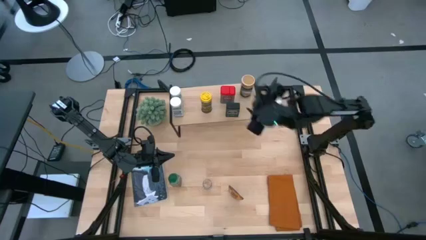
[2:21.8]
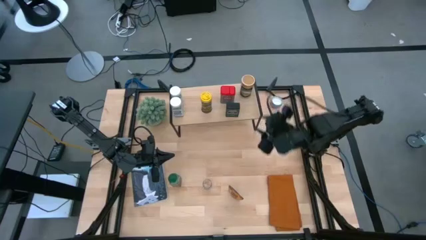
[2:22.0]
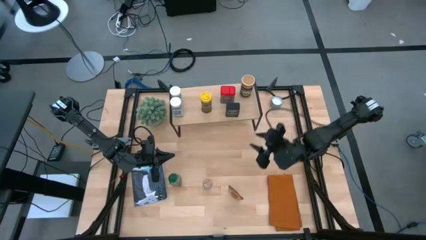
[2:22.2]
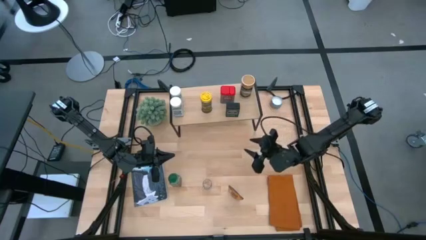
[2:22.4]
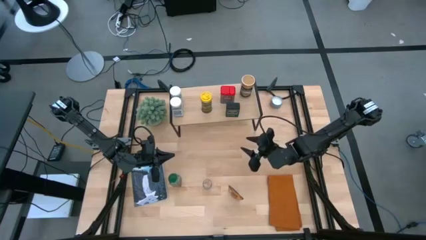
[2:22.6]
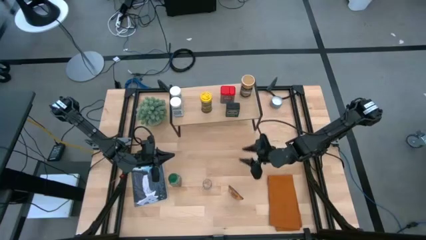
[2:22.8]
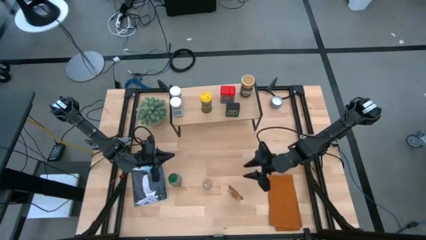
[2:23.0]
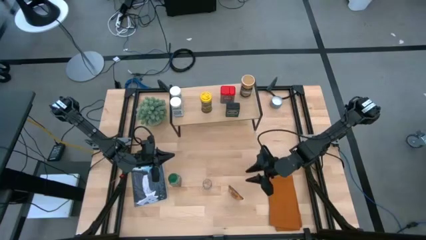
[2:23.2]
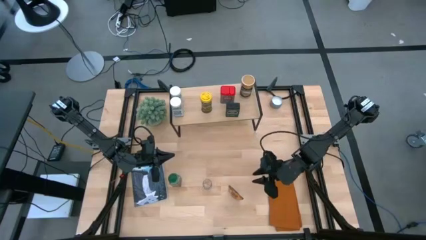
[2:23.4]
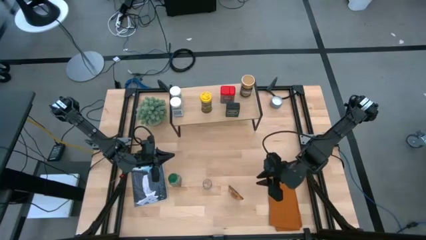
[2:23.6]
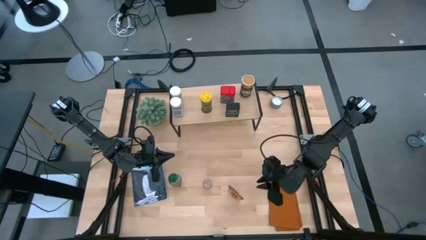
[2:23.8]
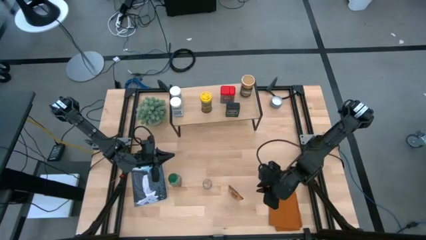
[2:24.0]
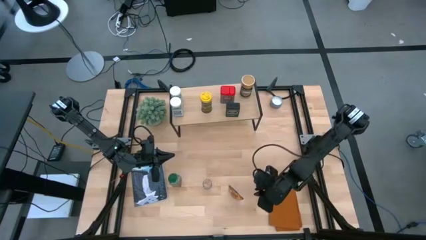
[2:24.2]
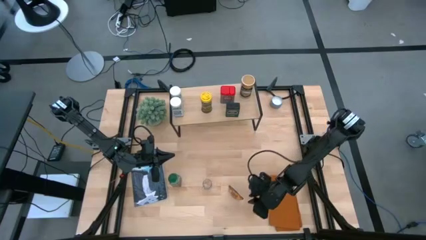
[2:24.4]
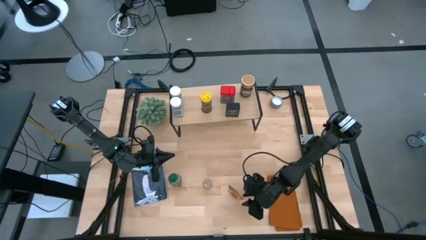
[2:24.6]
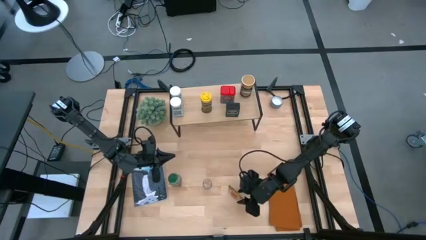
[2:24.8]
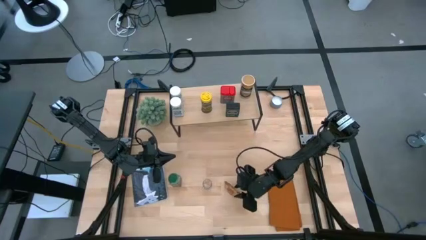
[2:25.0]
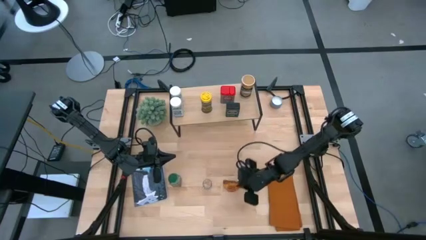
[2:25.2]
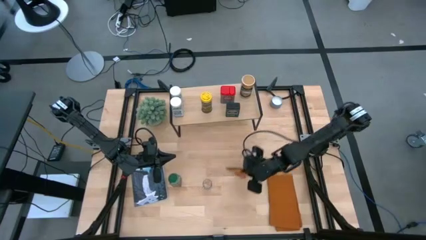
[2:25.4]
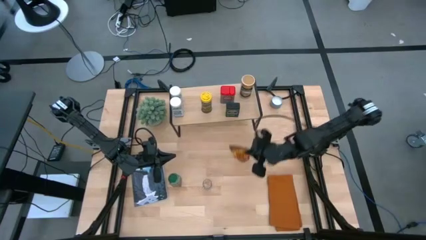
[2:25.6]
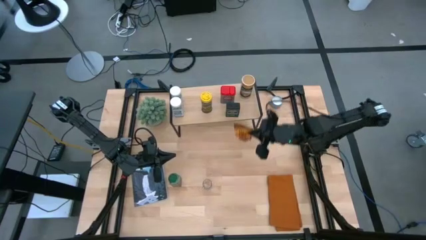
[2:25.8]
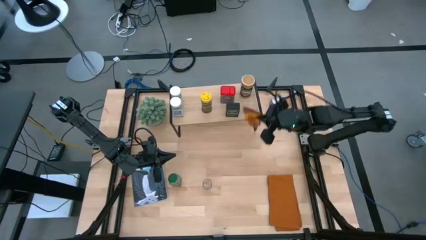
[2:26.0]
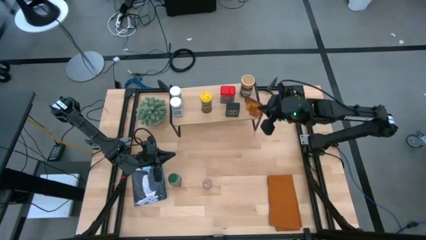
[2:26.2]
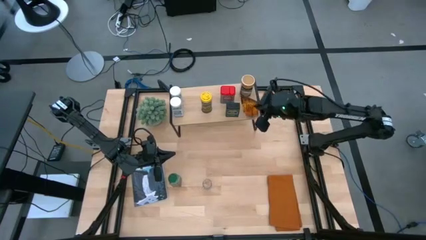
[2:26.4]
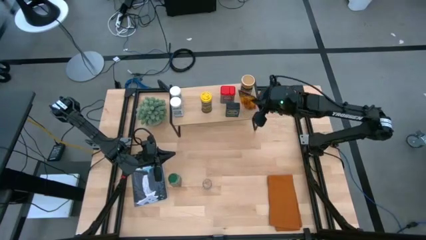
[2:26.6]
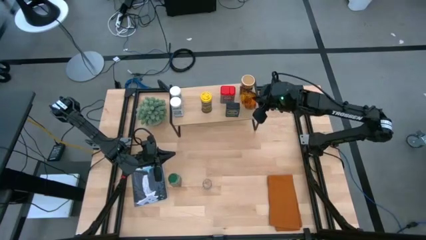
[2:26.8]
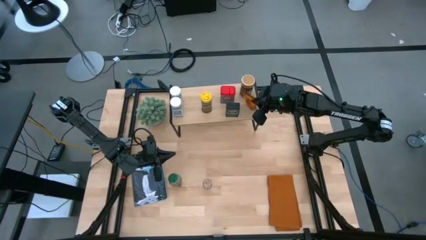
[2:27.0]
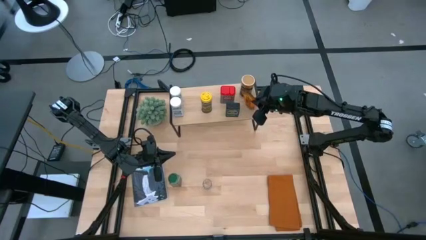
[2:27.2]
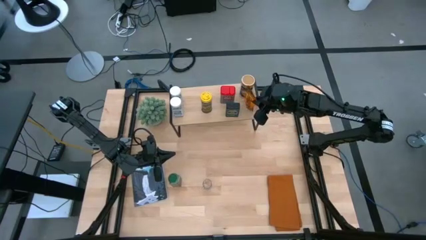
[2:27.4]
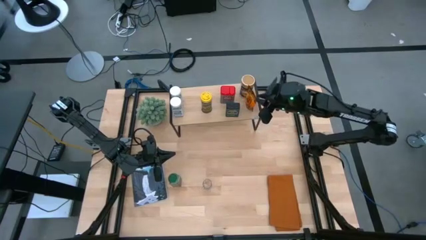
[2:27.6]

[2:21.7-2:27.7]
Task: Shelf spices
Put the orange seasoning bag on the shelf

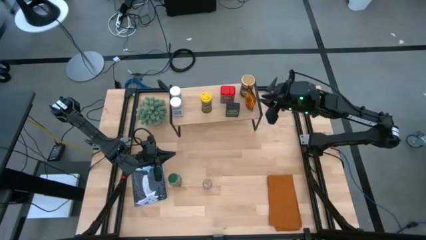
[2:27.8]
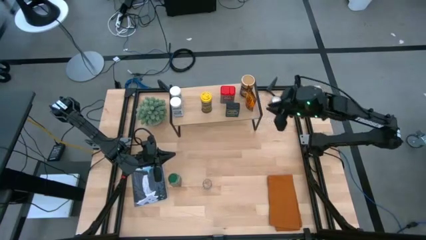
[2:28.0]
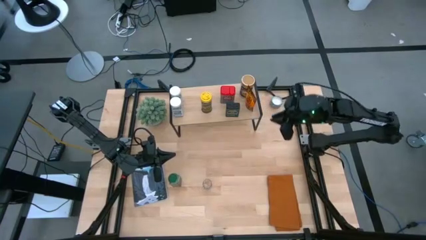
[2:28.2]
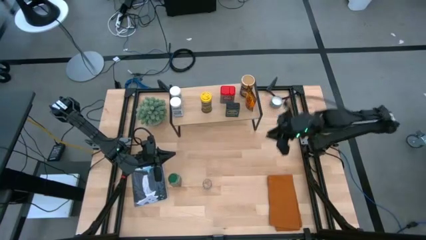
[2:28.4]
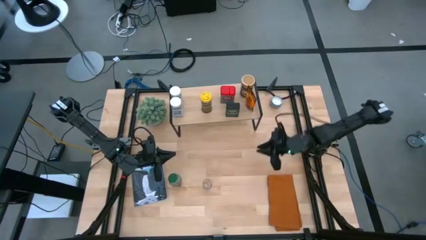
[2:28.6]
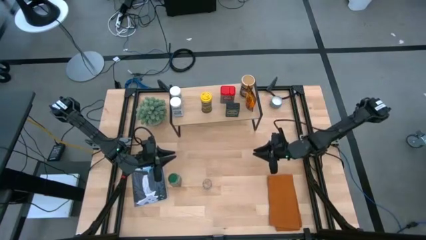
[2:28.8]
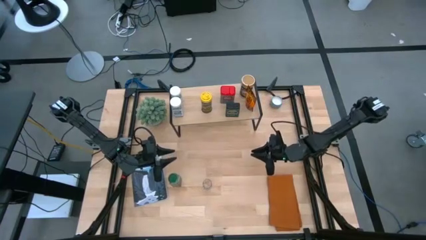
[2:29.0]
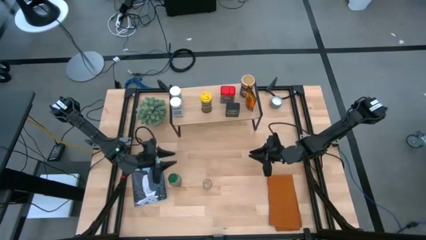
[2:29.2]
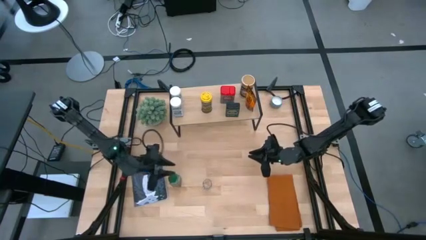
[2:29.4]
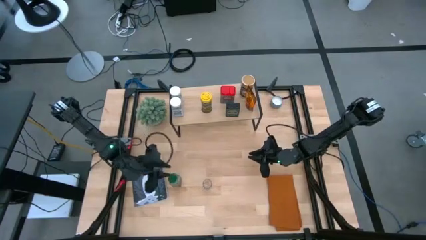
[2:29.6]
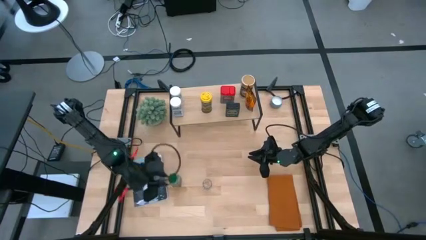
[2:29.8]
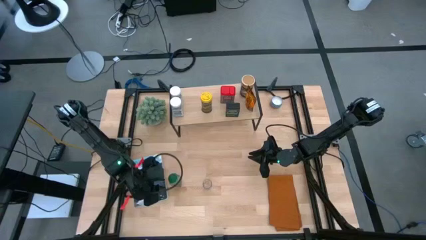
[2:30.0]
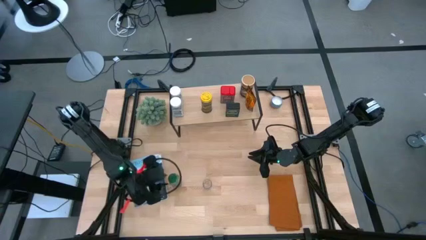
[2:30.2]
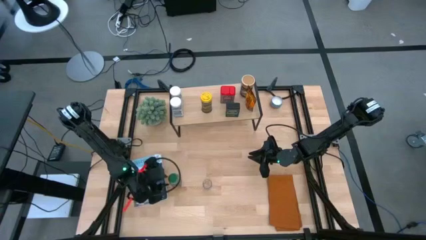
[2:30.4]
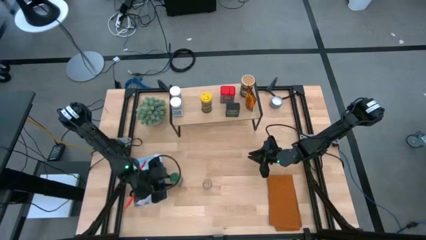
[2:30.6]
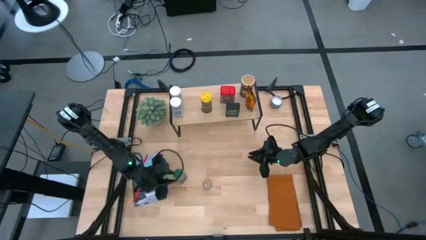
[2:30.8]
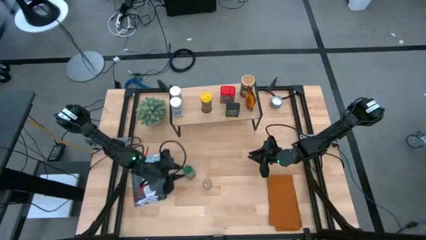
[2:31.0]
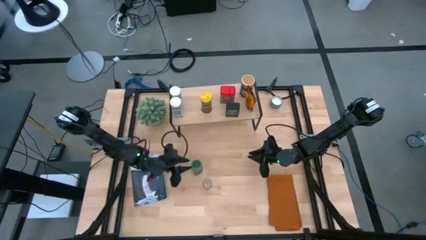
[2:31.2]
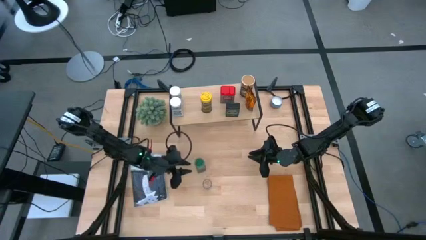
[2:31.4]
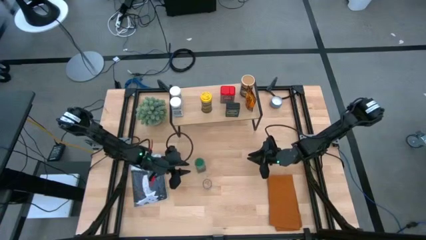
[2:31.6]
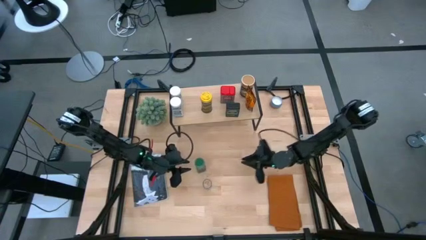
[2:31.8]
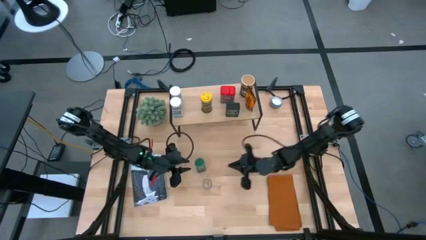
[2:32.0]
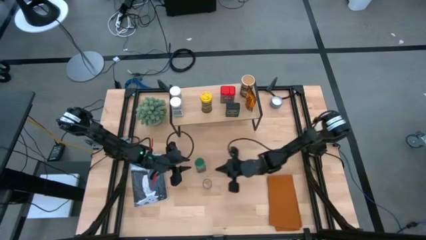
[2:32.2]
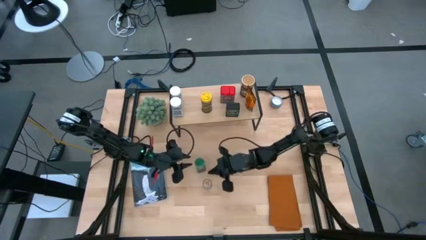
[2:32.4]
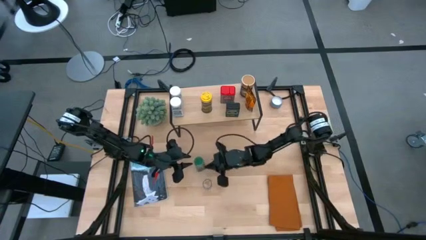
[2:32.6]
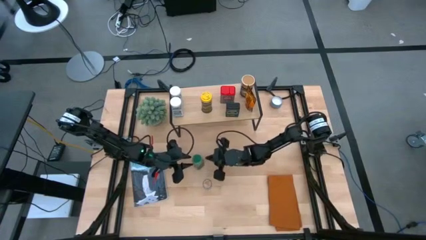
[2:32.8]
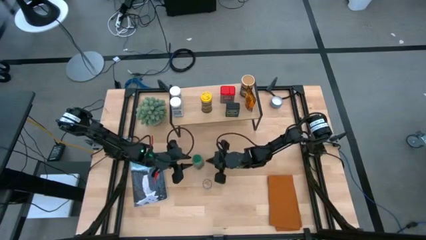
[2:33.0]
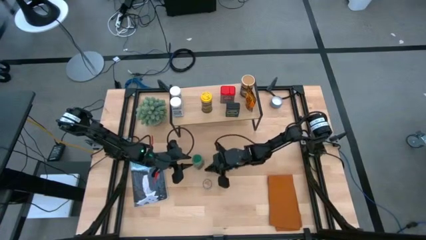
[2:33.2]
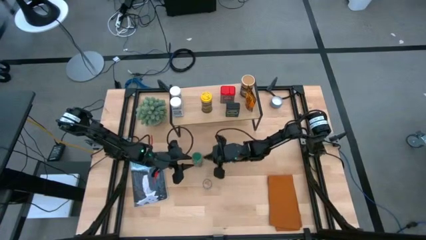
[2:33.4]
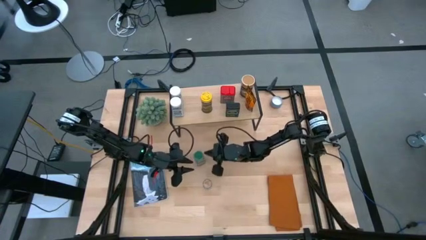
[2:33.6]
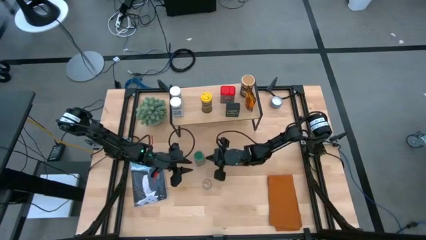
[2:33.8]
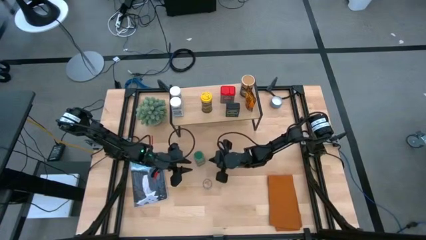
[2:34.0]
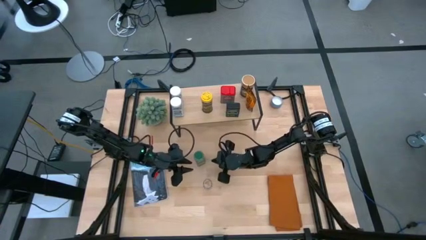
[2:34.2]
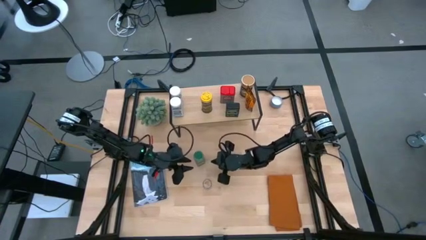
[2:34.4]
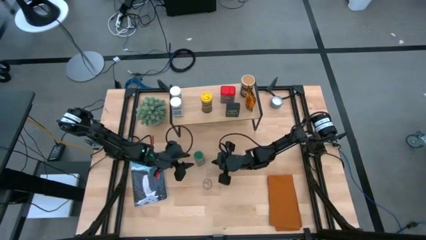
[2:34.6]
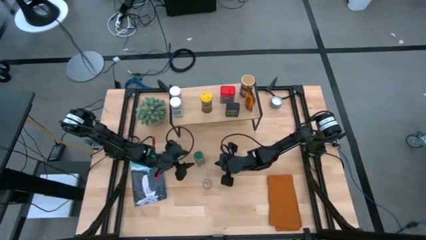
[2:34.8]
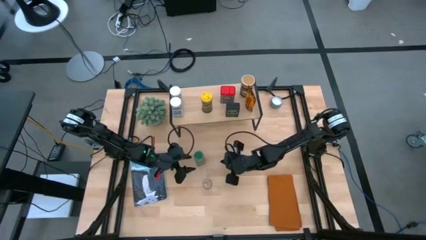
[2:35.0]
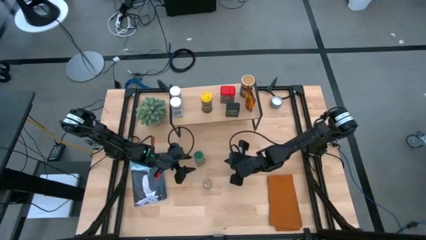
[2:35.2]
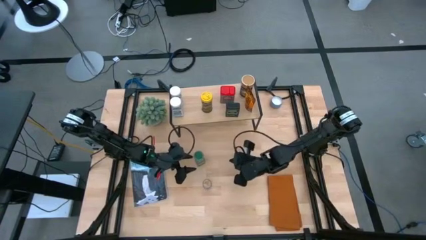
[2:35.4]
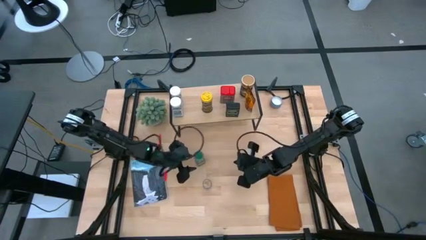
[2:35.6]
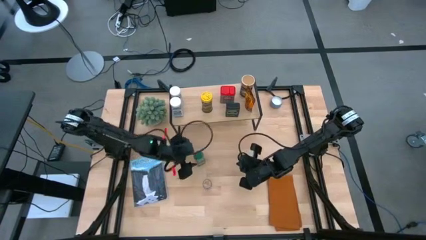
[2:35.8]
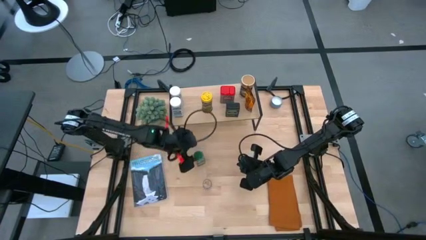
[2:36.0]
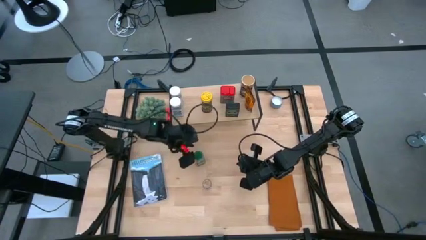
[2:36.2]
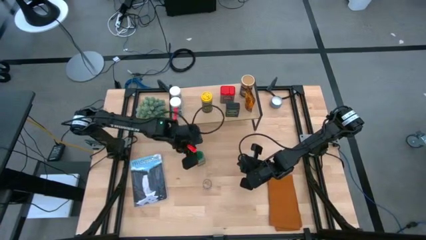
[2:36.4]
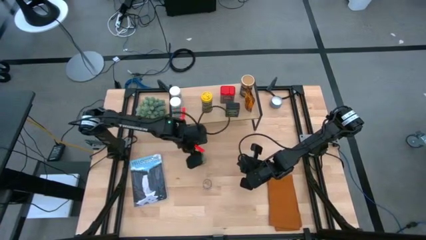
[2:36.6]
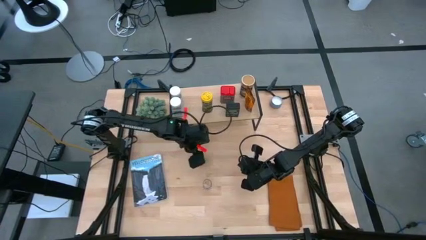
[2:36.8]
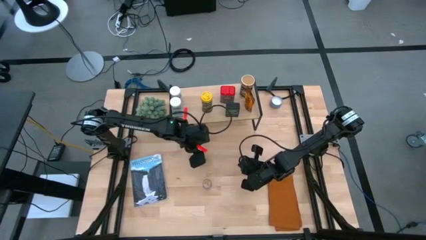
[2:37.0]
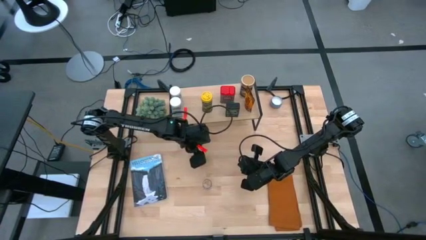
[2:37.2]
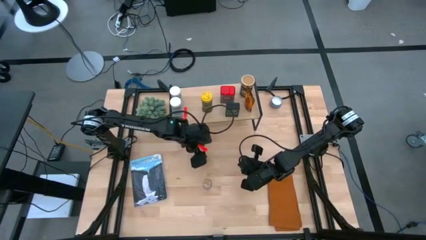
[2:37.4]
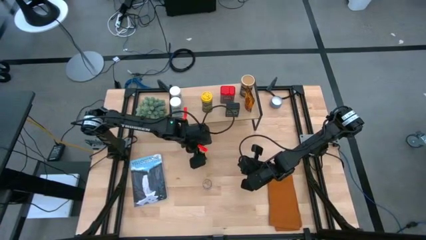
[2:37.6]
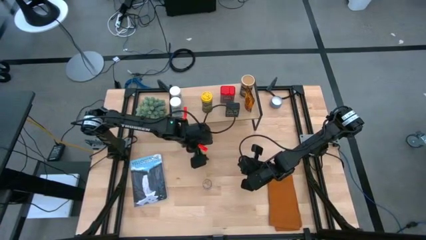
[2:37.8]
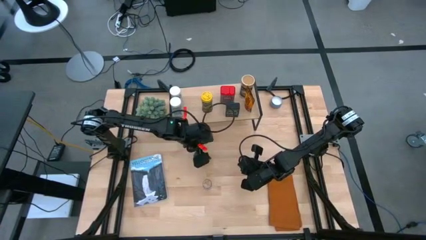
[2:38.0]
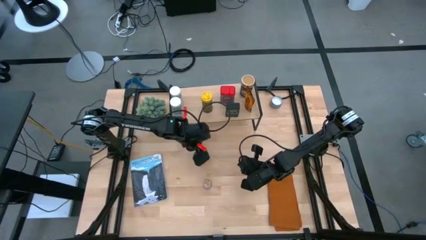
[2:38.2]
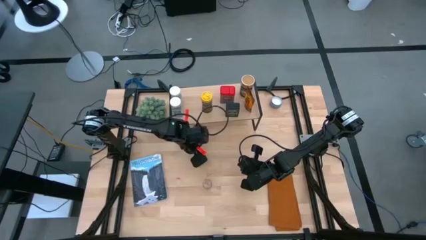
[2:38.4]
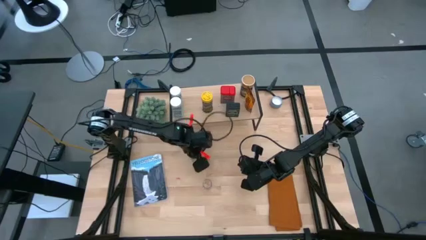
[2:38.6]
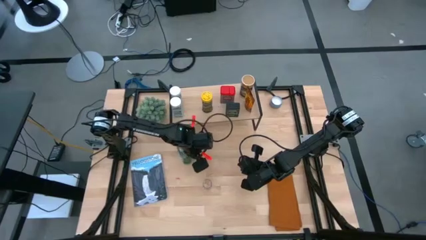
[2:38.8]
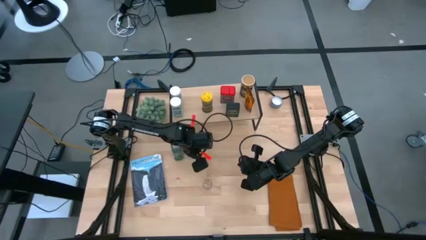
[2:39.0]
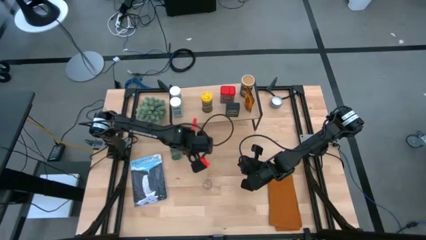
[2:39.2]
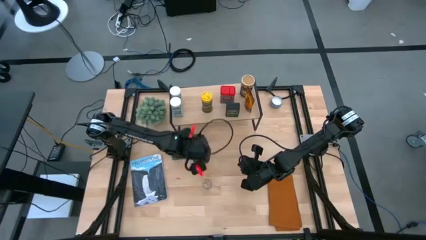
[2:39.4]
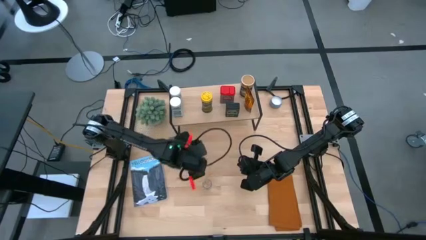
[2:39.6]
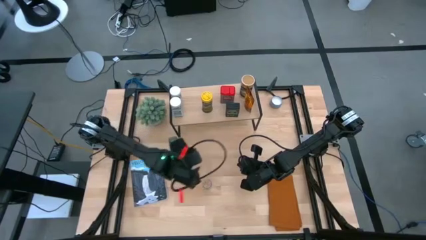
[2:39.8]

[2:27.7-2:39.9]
Put the green seasoning bottle on the shelf
